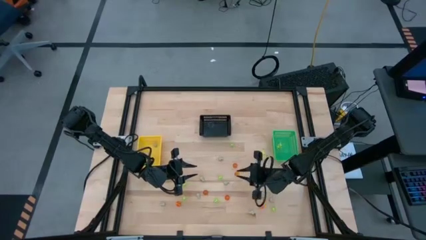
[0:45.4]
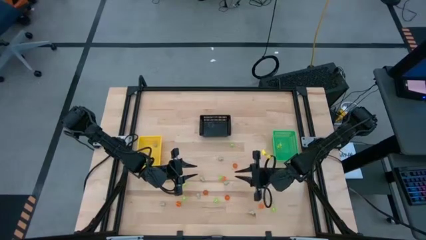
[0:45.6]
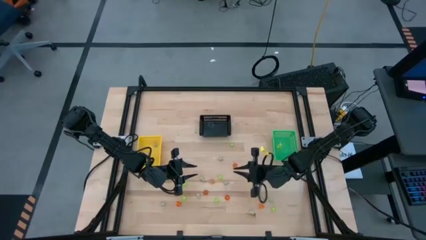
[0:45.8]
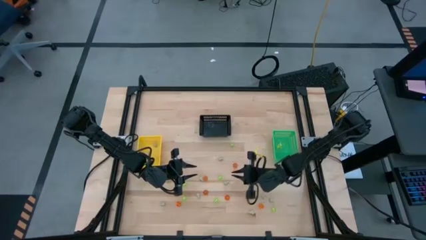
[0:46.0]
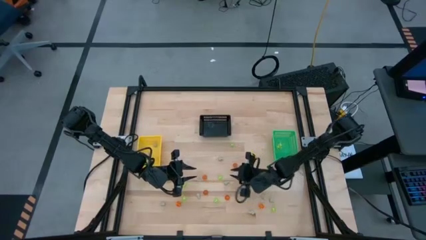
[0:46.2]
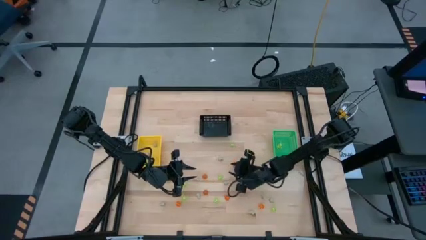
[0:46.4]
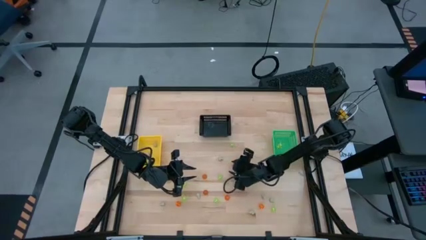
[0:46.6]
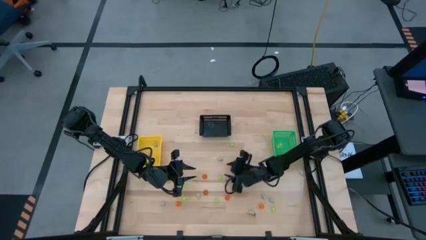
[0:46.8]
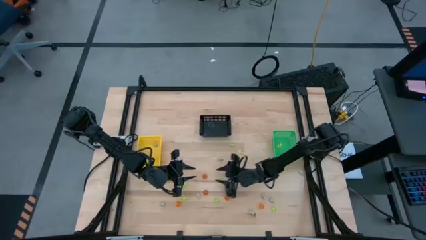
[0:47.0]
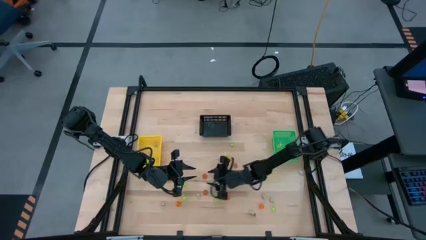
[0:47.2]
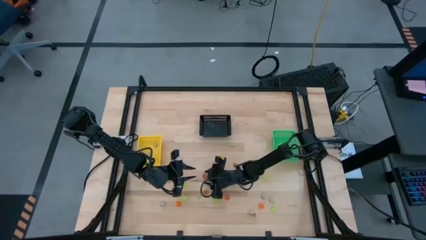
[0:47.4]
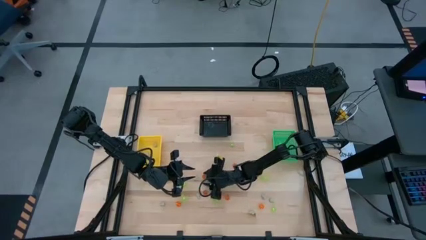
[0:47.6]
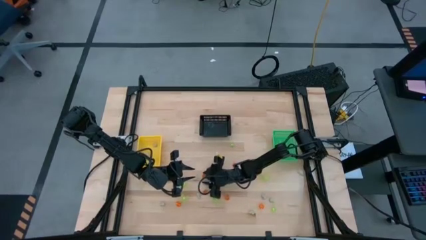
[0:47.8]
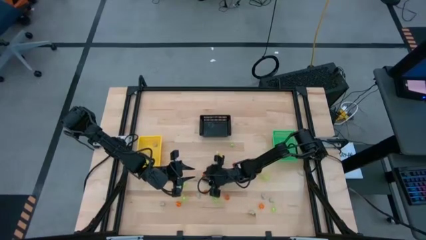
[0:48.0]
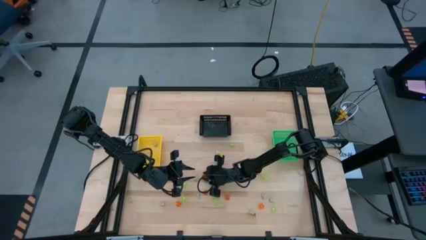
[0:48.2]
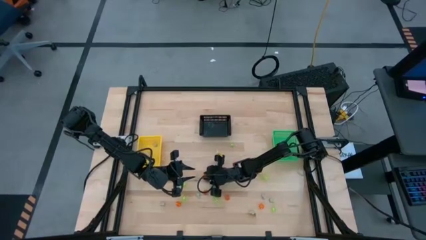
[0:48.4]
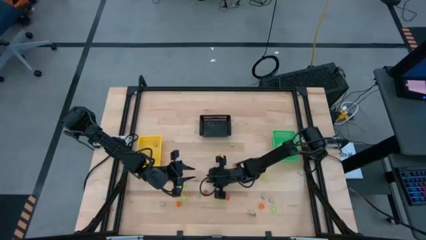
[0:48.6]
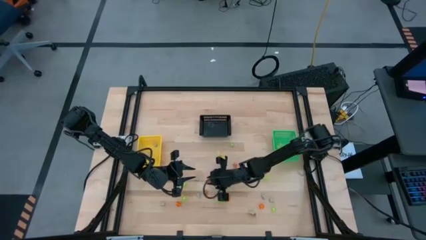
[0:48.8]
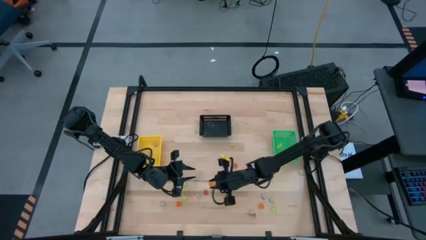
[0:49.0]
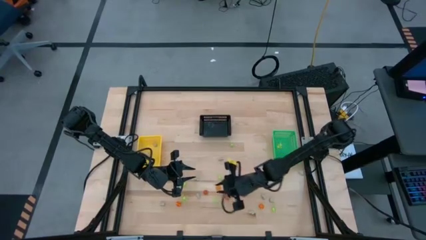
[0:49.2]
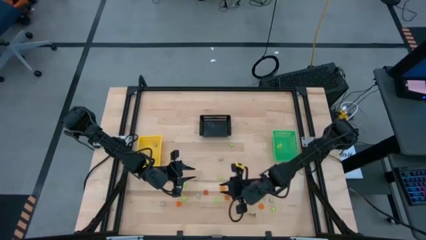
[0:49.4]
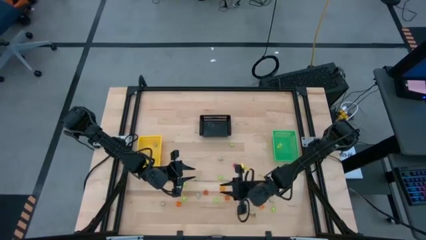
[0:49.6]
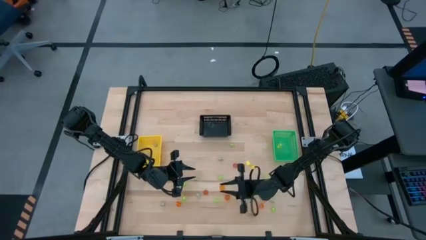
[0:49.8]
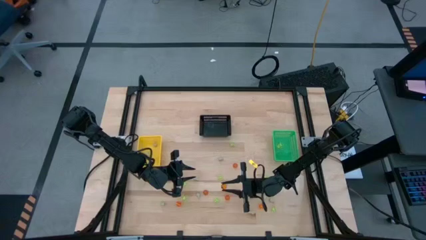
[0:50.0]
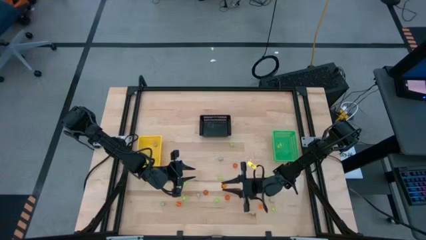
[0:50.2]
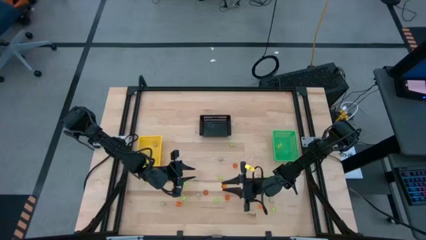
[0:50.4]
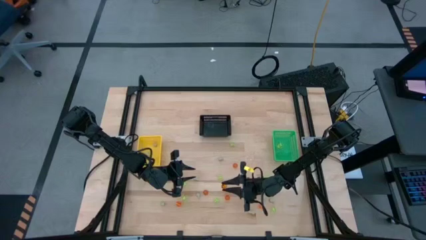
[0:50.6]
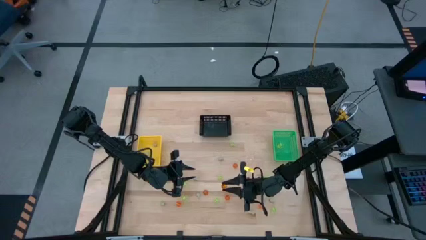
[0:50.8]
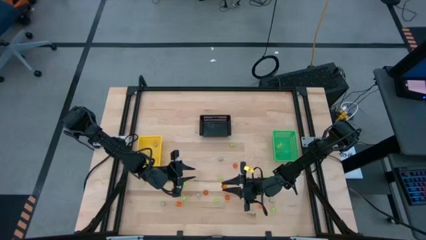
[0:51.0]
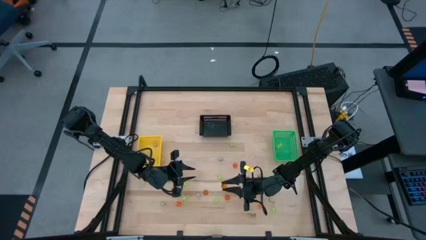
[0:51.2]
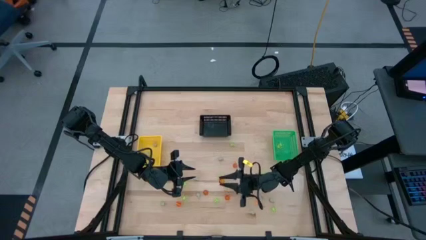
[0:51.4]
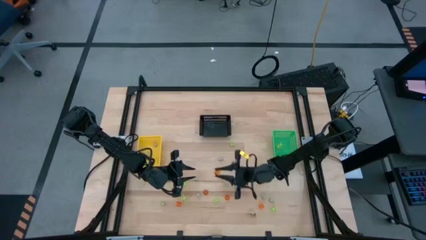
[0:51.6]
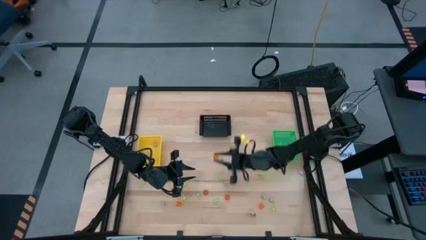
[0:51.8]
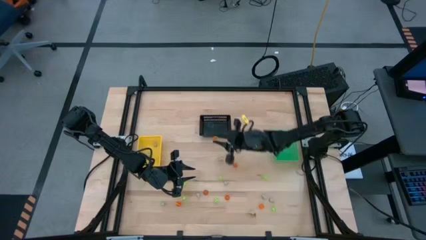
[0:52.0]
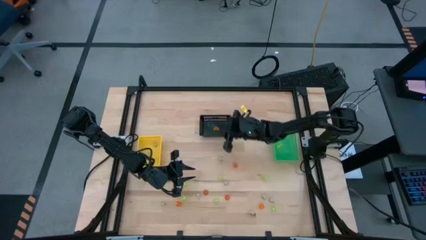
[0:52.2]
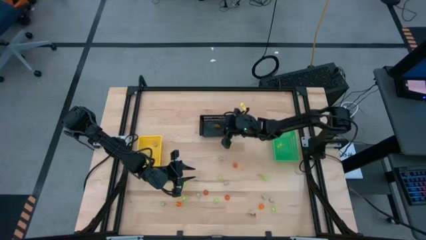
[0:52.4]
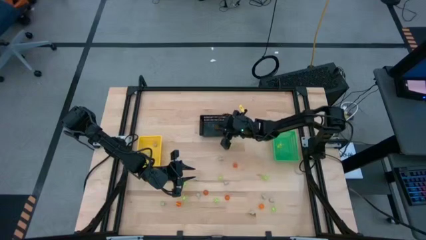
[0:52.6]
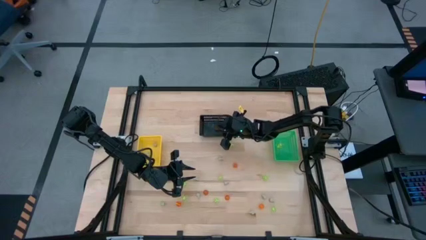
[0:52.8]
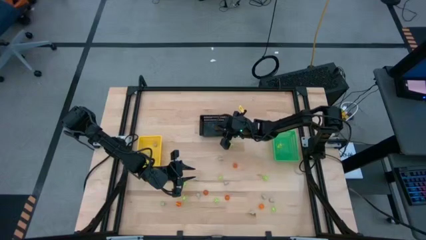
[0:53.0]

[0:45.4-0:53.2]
Task: Sort Halloween decoration
Put the orange pumpkin toy into the black bin

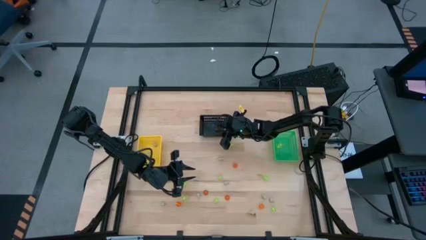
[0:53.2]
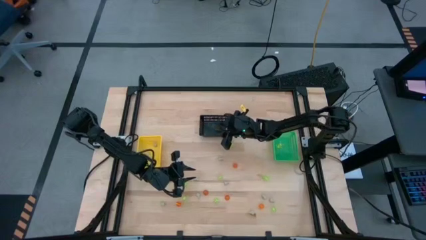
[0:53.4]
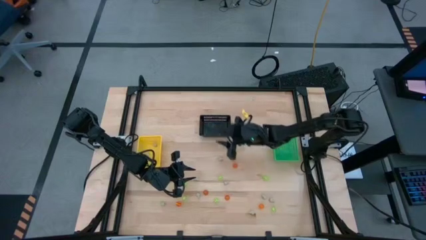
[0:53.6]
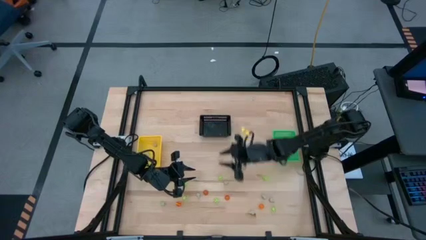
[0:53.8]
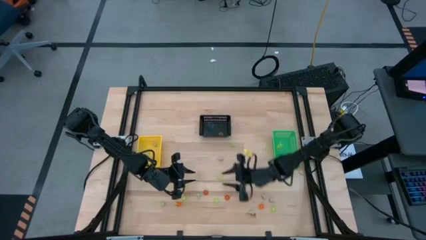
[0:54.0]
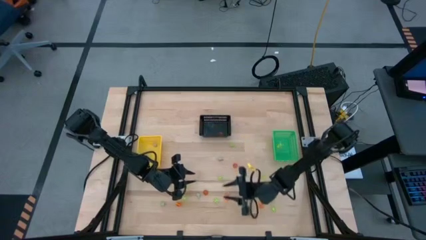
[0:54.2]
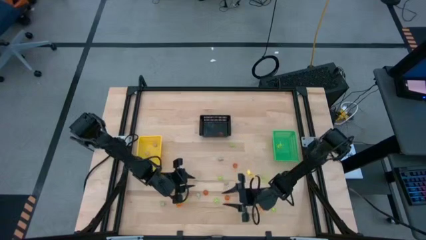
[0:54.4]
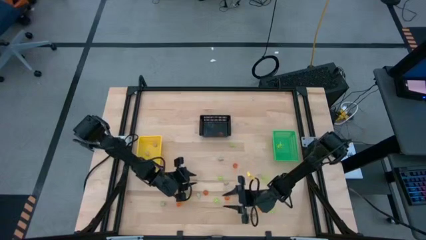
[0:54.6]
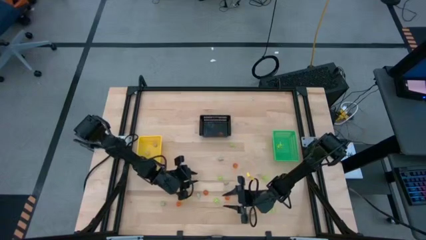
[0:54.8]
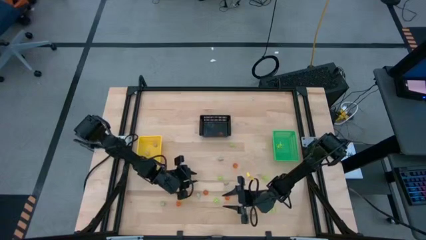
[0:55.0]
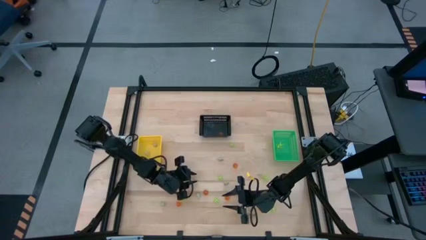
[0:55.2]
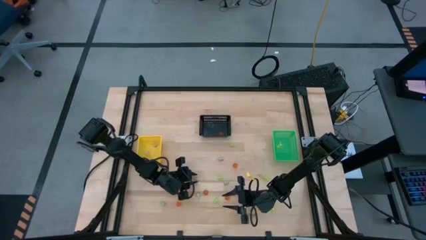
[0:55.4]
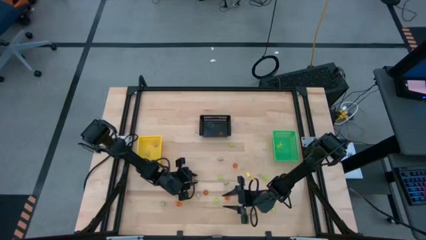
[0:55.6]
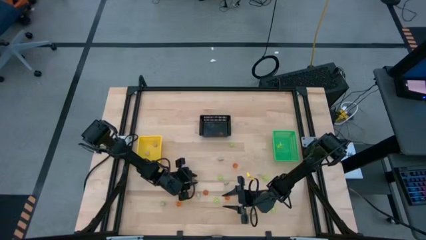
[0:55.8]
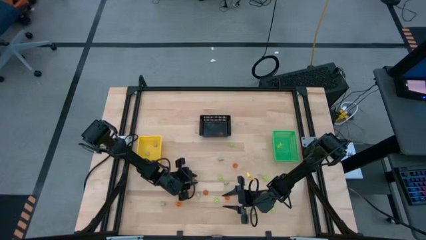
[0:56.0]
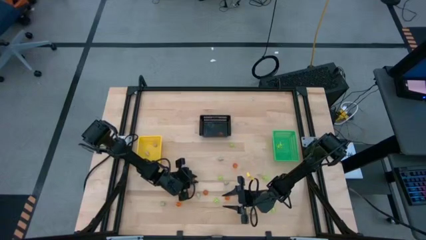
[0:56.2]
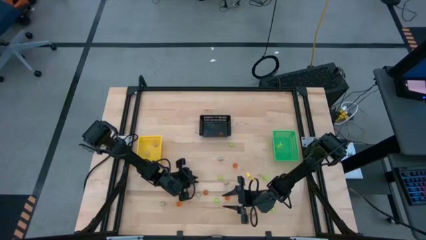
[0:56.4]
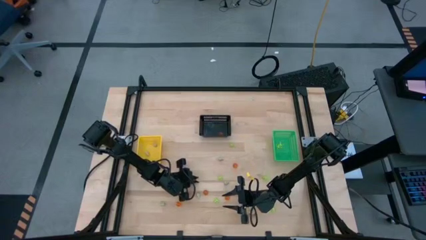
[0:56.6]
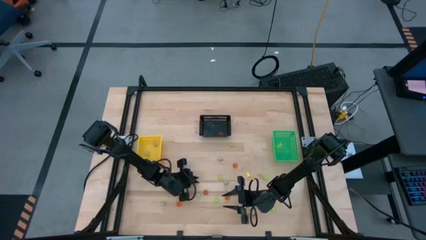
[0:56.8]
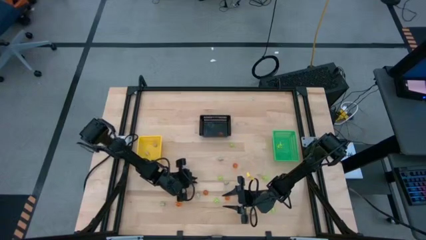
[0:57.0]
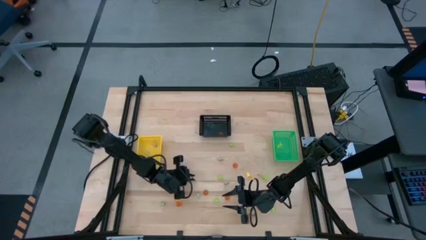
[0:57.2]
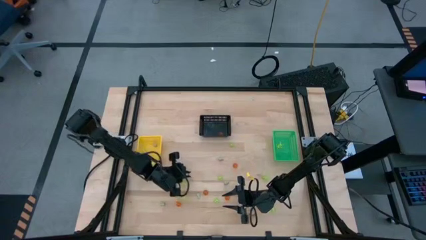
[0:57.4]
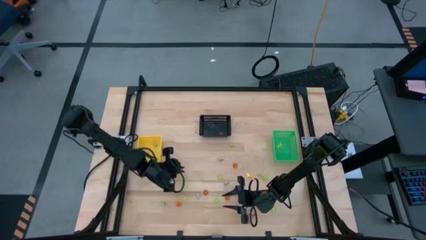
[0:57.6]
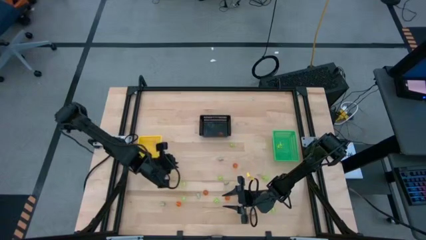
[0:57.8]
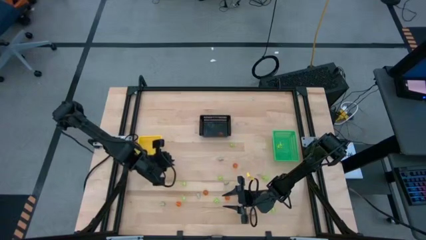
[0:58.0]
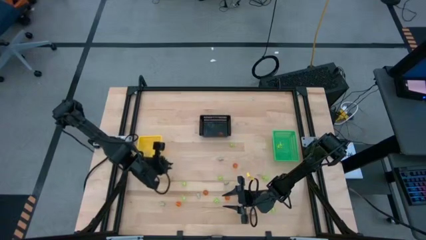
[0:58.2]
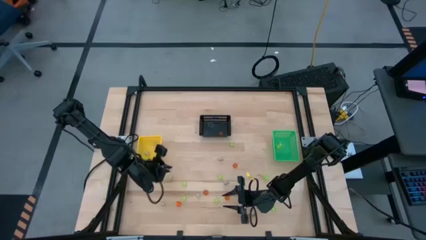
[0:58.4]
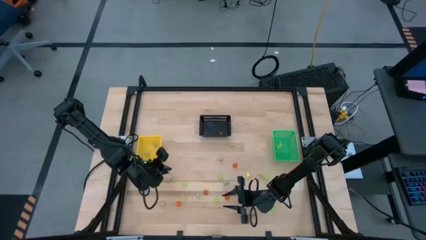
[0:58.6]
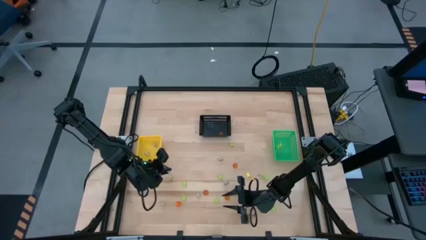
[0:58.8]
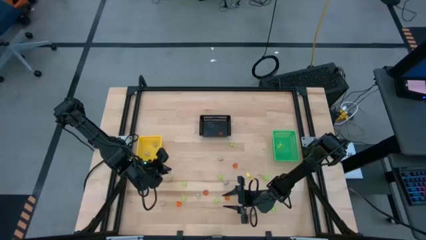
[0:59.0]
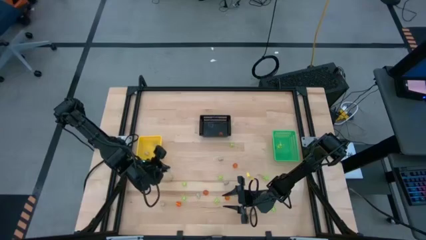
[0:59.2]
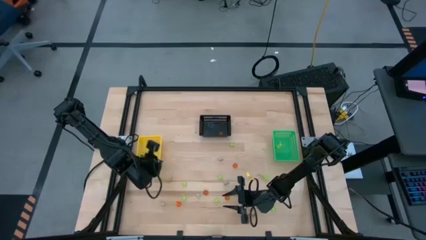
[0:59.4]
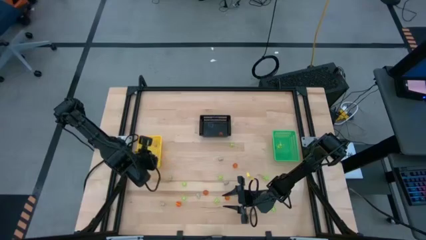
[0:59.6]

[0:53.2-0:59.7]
Put the white skull toy into the yellow bin
